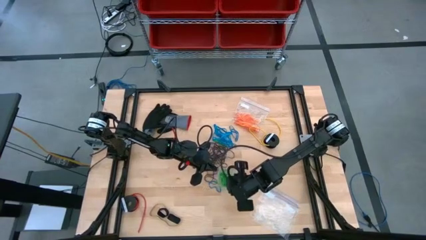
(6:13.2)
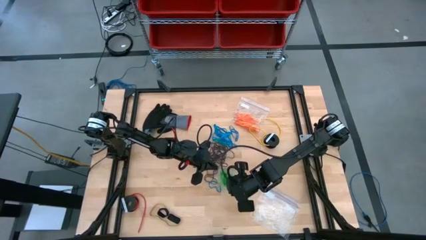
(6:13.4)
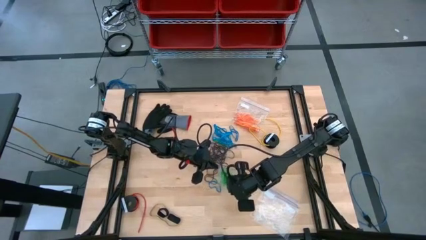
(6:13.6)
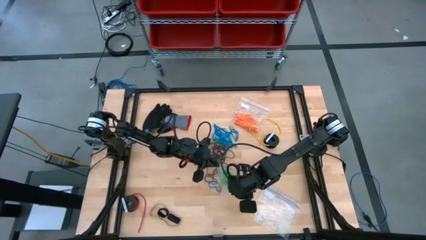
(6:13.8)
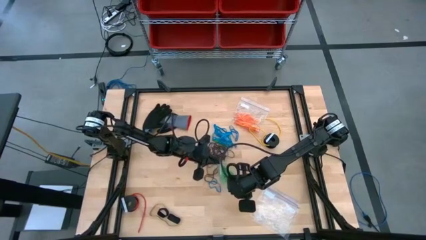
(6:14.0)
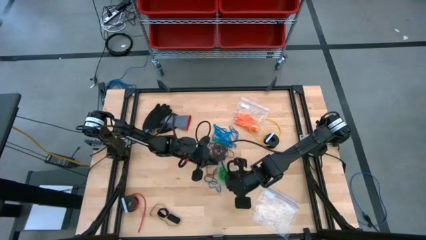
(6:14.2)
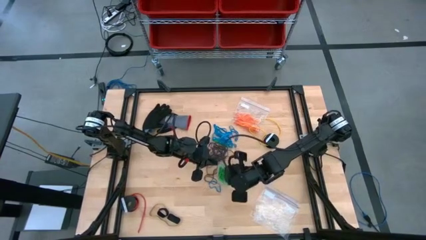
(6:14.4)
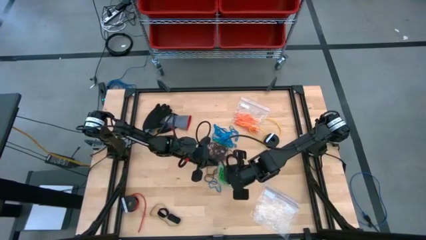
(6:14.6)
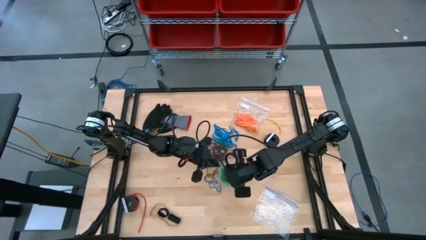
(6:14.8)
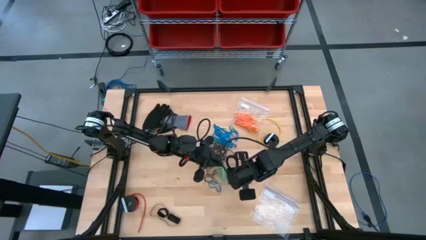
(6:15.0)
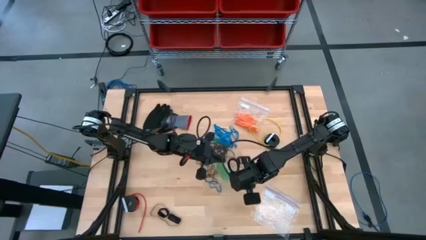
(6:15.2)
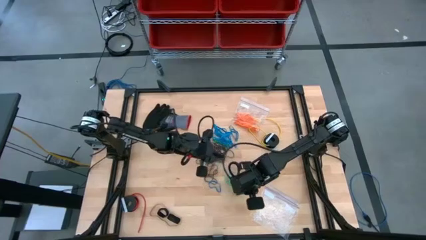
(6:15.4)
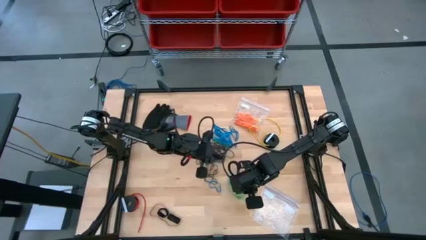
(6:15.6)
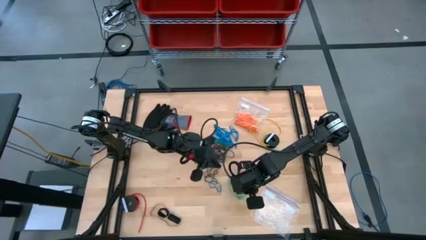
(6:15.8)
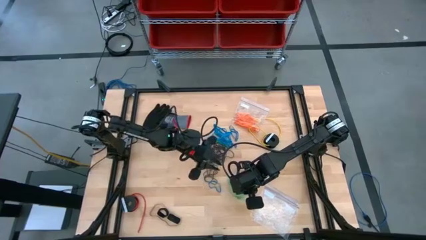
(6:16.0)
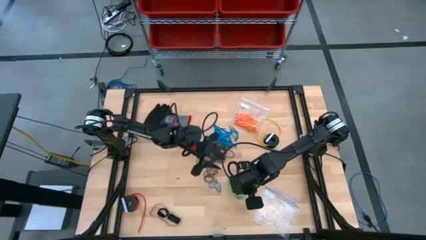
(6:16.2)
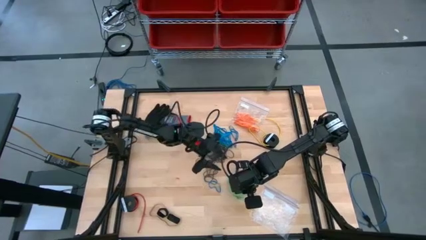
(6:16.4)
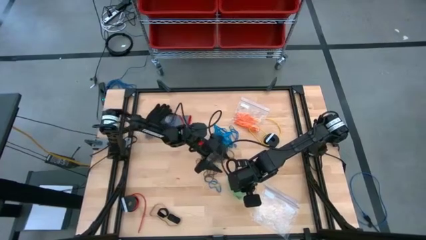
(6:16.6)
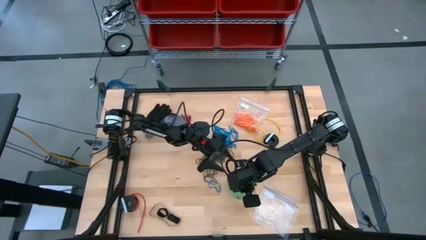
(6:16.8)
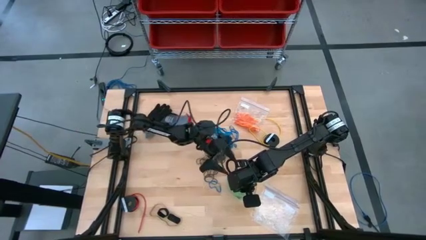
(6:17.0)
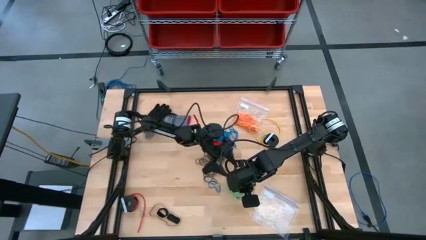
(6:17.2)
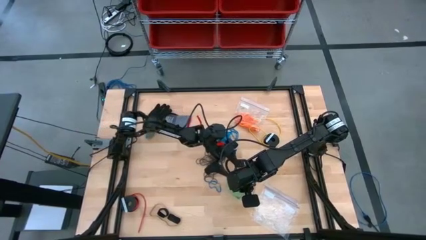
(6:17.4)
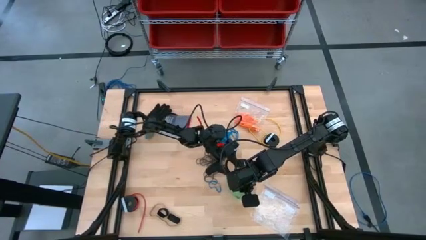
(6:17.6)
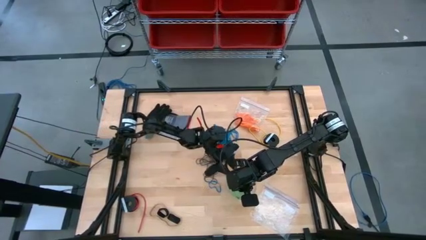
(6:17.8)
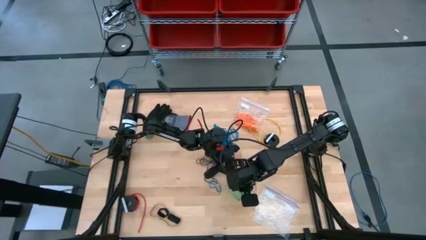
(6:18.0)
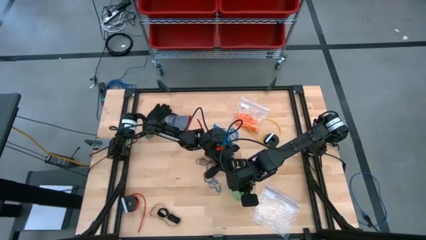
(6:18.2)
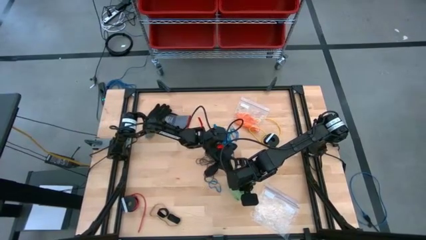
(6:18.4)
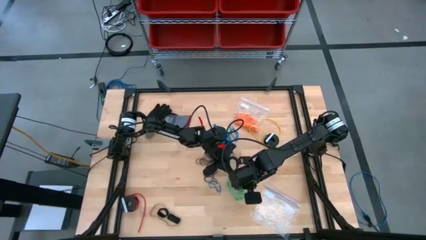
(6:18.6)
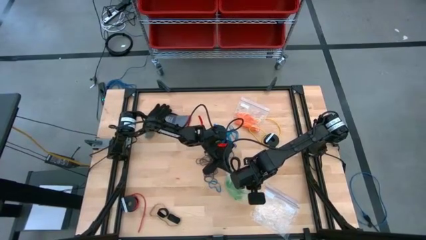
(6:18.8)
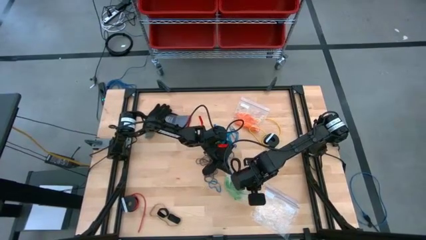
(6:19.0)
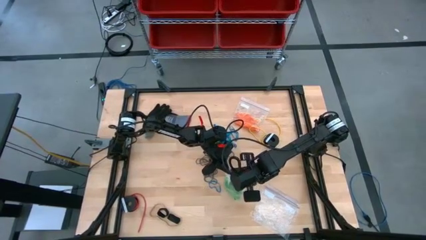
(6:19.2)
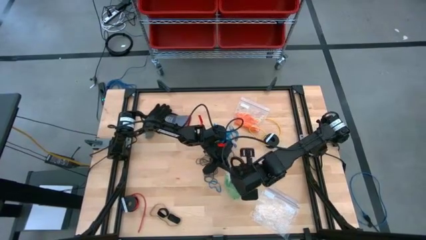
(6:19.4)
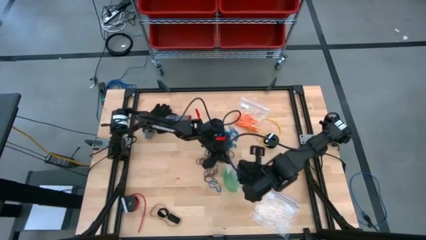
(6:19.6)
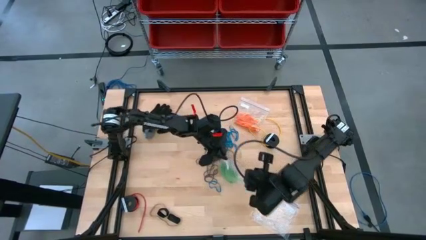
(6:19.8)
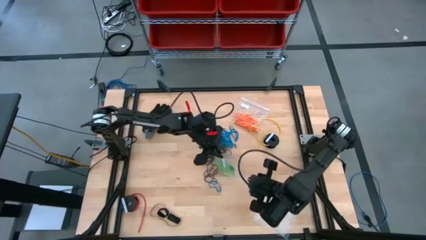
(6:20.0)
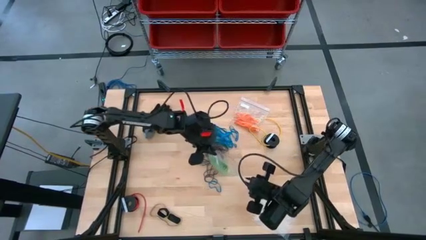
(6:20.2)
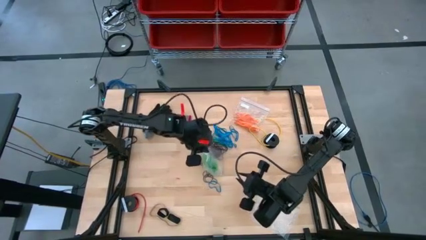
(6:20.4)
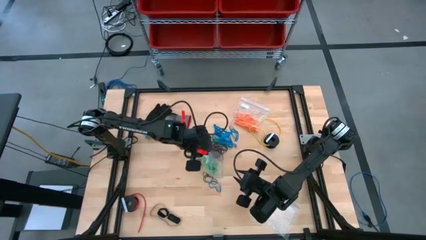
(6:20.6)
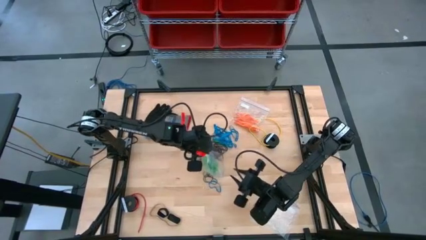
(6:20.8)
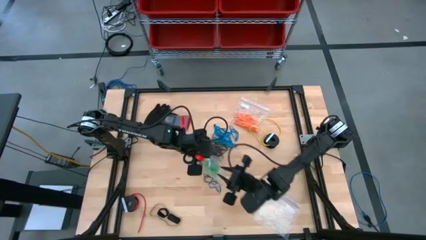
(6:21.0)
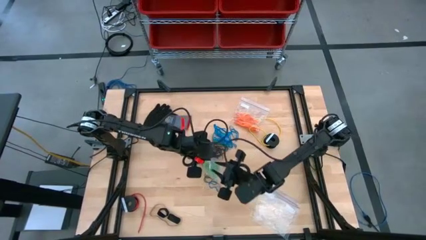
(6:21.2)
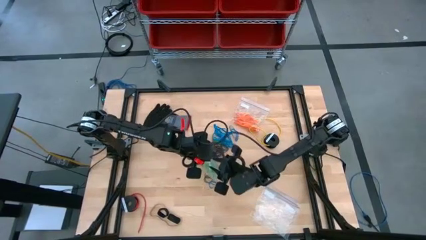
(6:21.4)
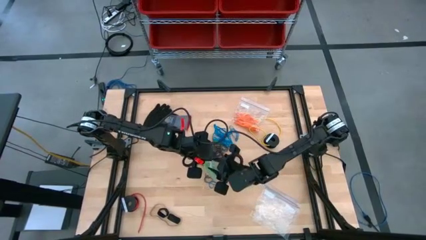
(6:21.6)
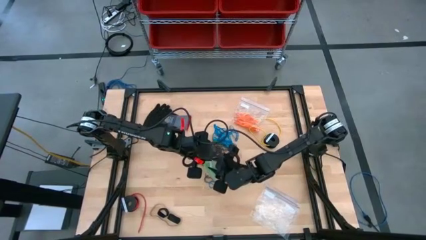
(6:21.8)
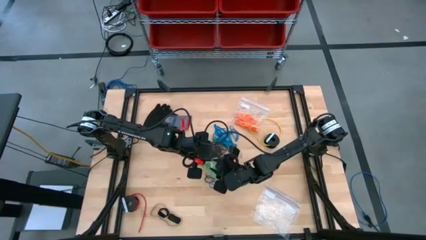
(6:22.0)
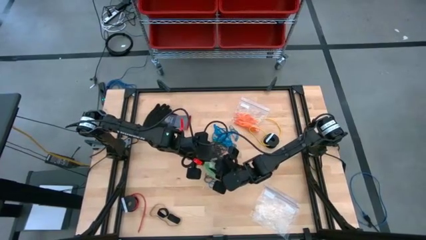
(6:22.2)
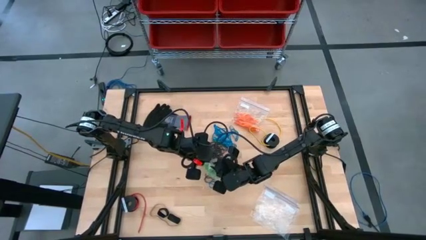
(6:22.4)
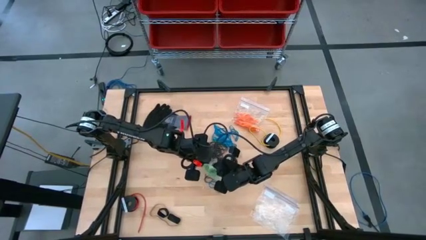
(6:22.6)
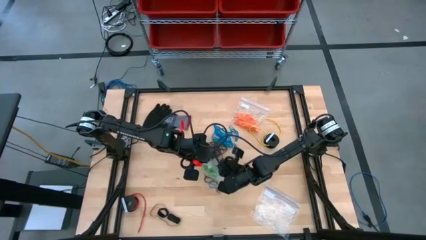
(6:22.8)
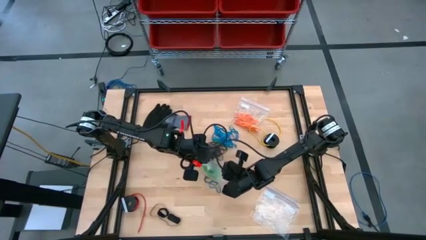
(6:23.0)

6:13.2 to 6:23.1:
Task: Sort rubber bands
Close the transparent zip bag

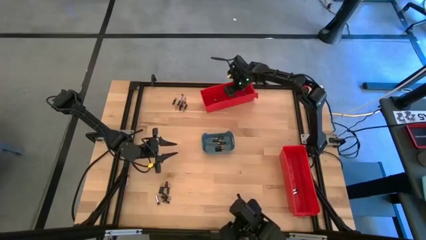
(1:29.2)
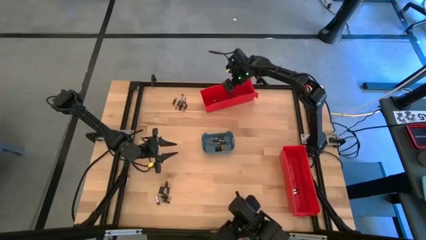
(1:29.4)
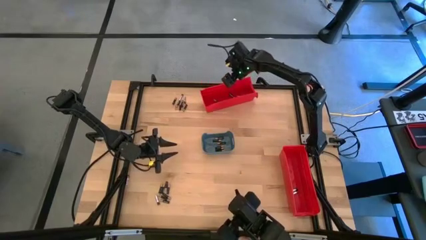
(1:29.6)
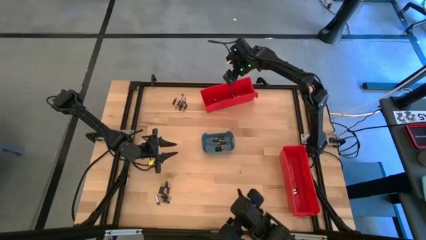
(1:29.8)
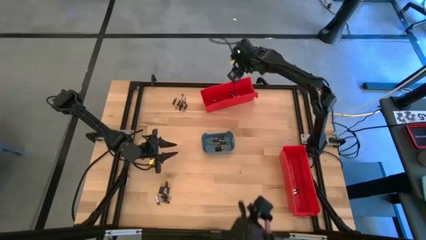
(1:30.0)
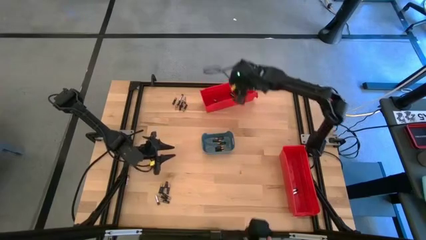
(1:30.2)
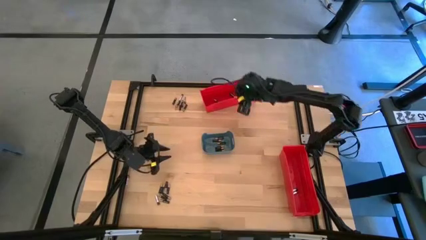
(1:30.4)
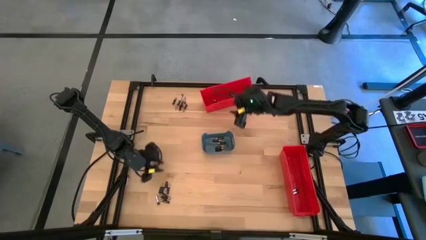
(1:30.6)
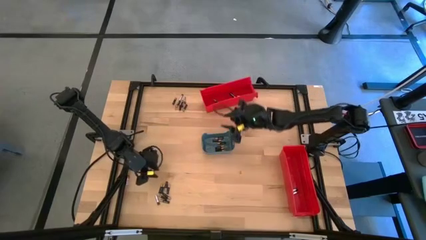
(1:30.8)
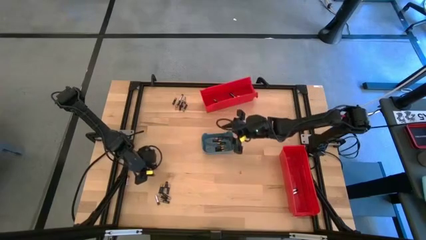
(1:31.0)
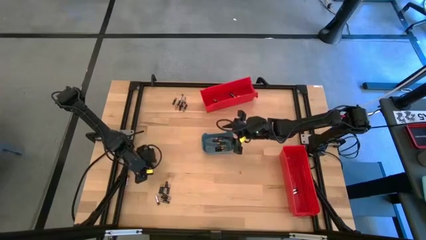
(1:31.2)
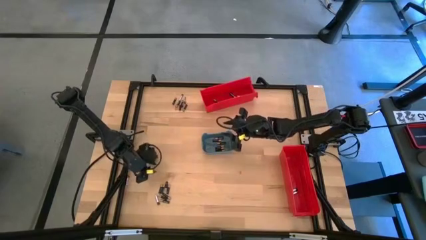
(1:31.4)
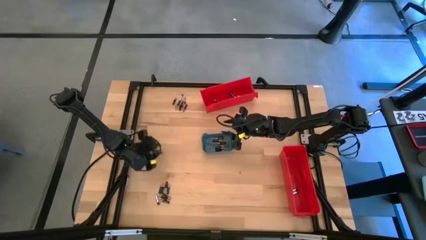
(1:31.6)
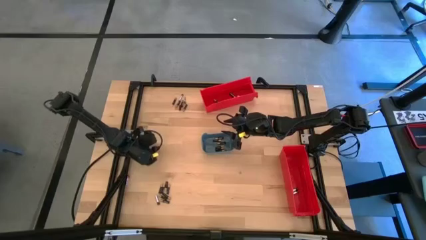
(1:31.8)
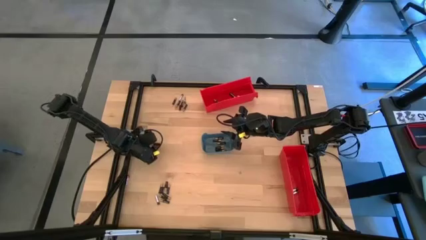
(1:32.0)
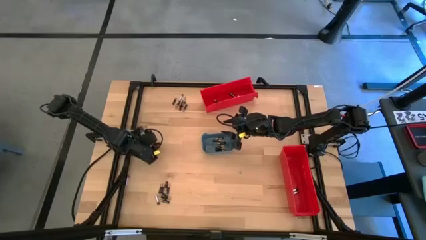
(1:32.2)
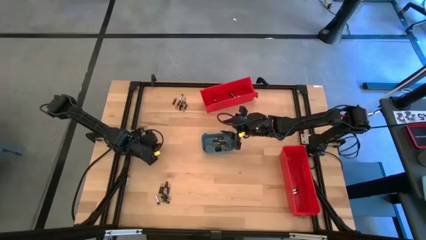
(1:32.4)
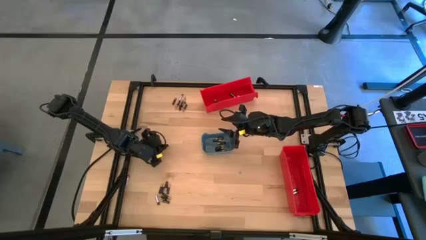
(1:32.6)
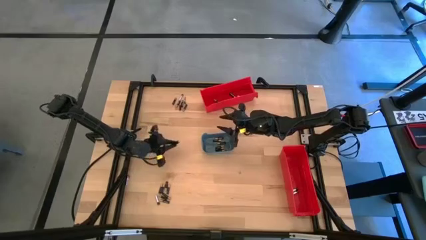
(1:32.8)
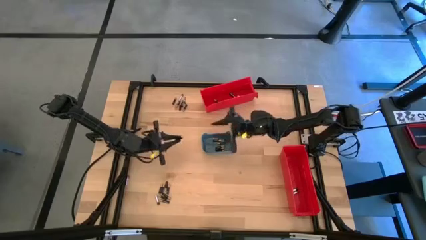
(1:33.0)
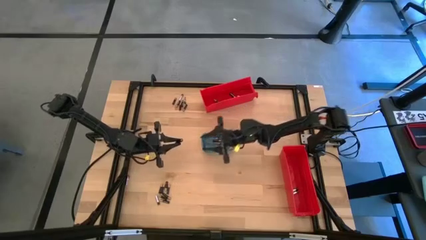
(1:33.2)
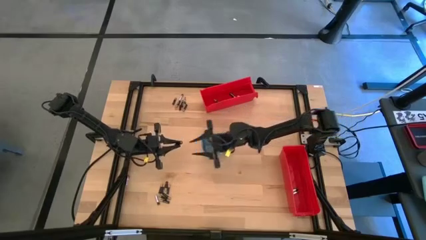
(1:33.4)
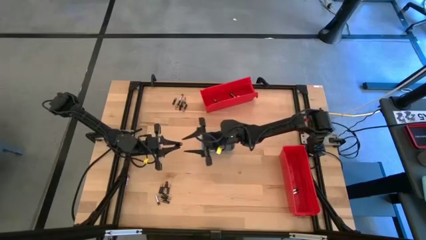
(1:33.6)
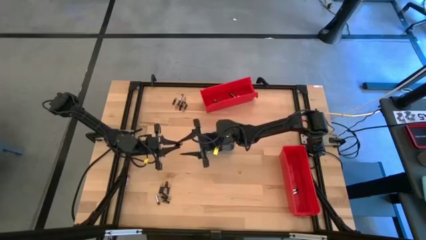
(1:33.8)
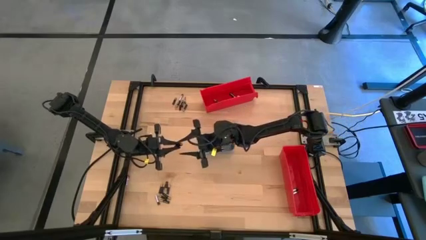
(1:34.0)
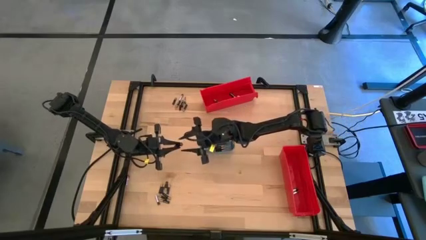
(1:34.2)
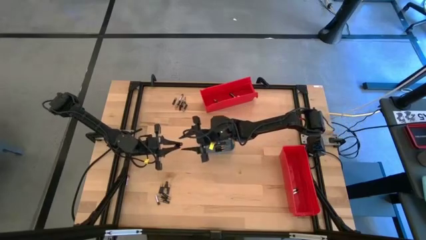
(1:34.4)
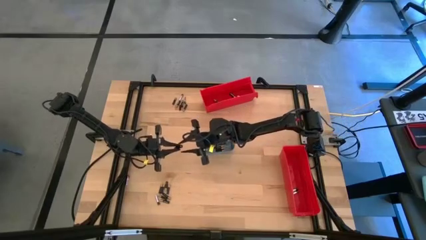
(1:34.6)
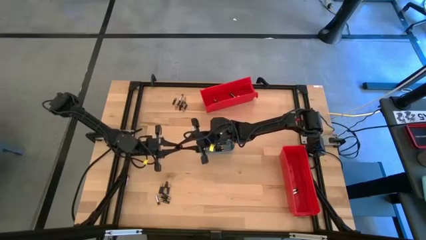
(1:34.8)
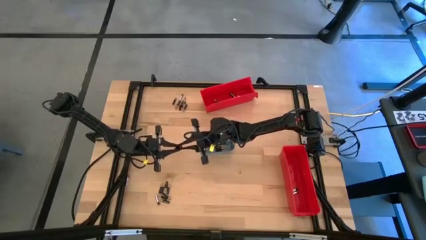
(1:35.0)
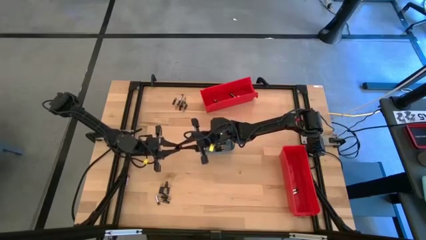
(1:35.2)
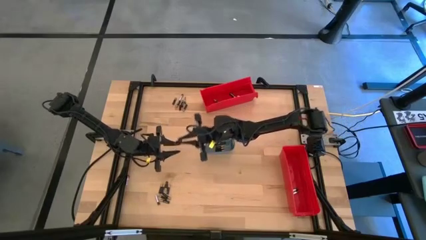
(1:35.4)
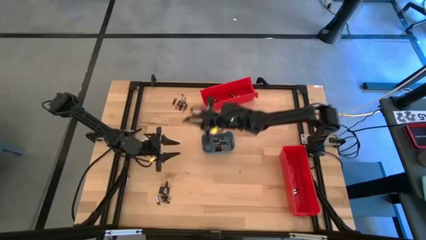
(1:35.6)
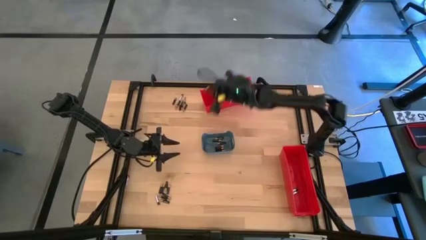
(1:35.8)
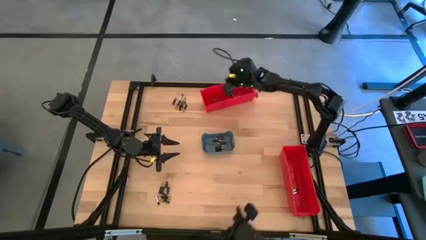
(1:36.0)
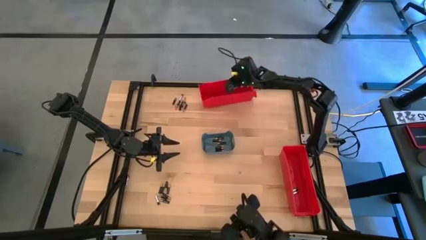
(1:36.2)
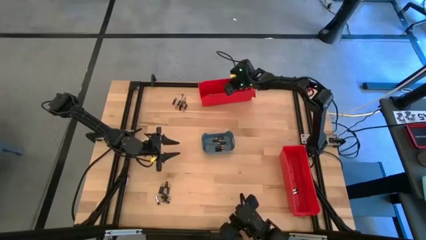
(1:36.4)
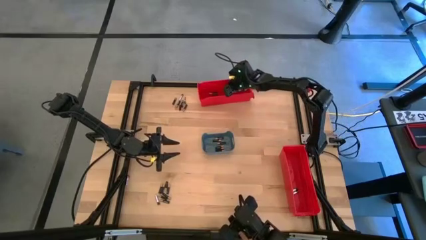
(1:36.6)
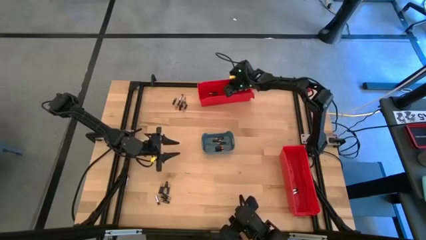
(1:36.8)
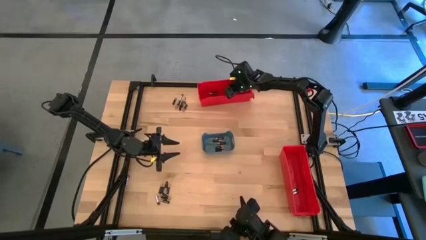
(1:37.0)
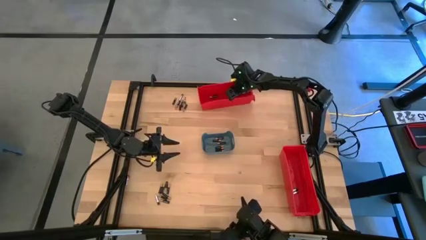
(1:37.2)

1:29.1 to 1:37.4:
Task: Sort batteries
Put the black battery into the top red bin
